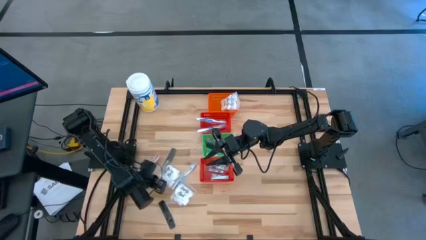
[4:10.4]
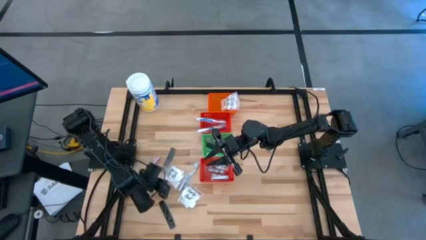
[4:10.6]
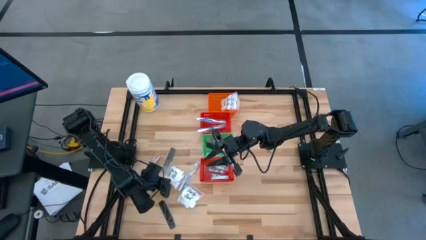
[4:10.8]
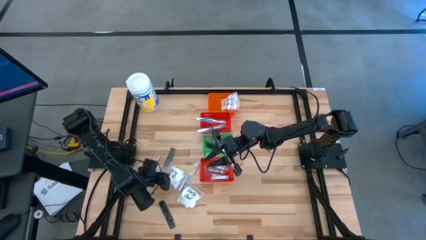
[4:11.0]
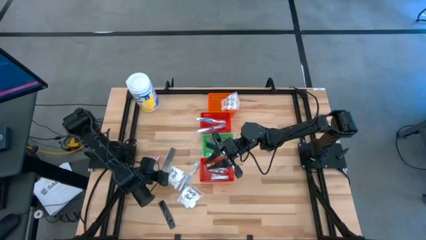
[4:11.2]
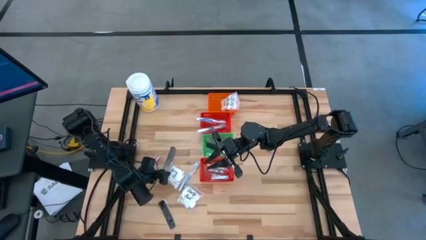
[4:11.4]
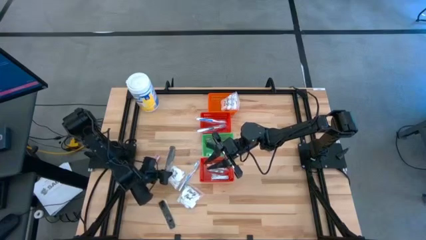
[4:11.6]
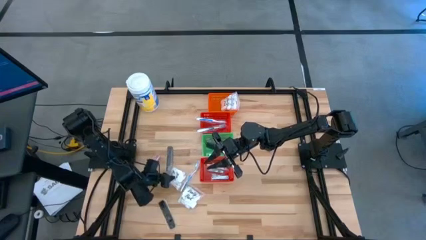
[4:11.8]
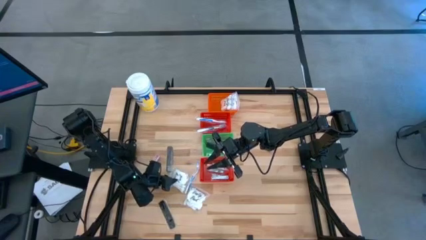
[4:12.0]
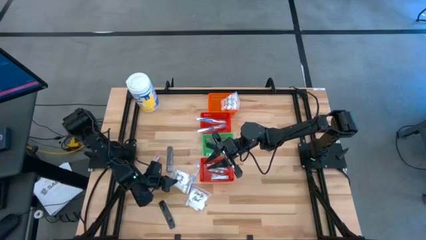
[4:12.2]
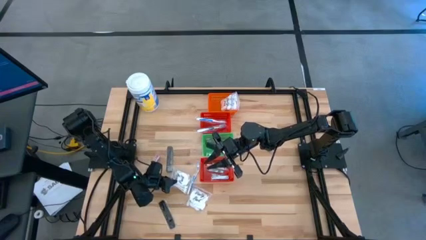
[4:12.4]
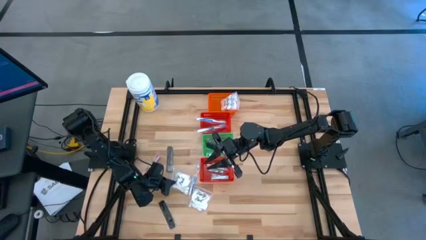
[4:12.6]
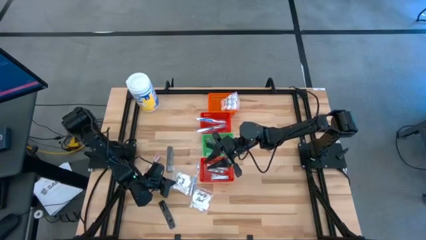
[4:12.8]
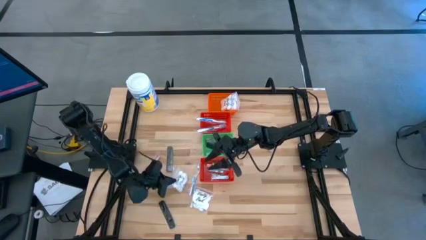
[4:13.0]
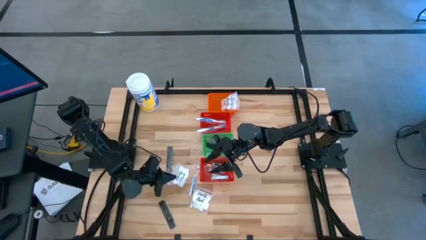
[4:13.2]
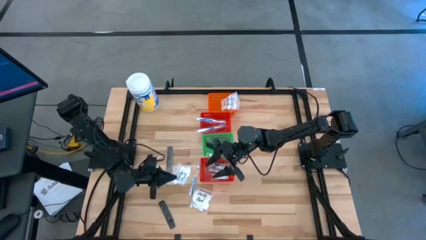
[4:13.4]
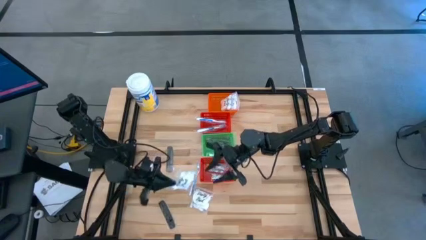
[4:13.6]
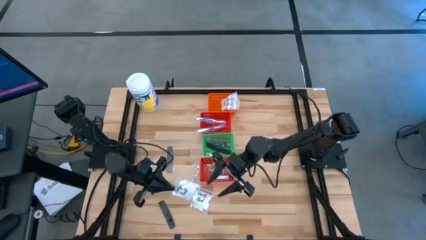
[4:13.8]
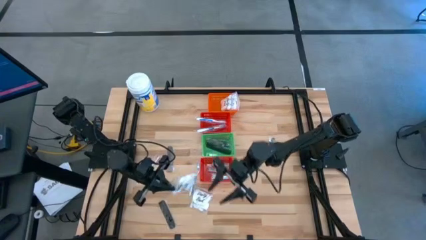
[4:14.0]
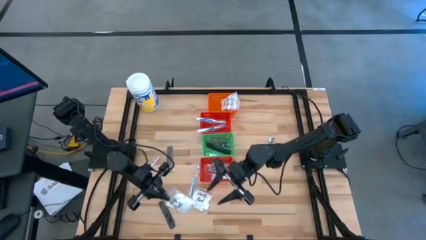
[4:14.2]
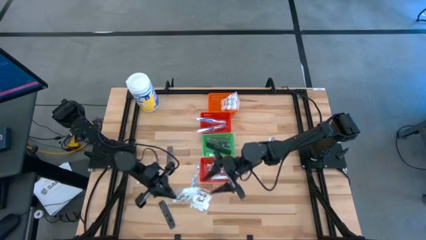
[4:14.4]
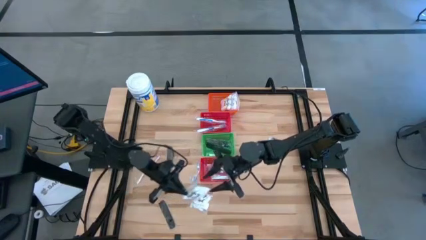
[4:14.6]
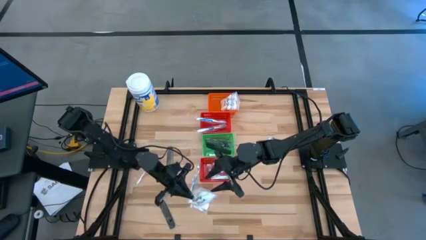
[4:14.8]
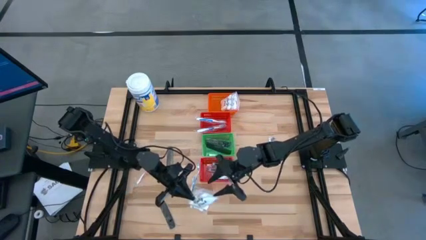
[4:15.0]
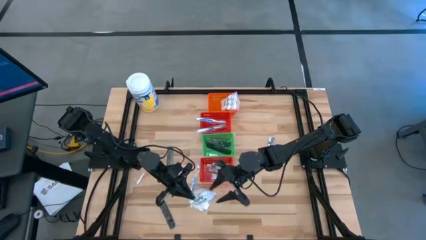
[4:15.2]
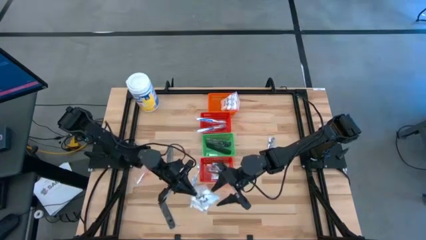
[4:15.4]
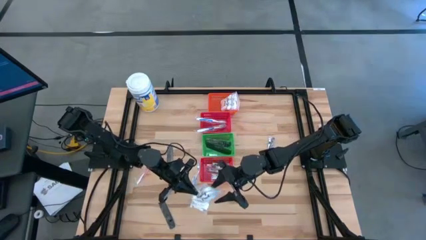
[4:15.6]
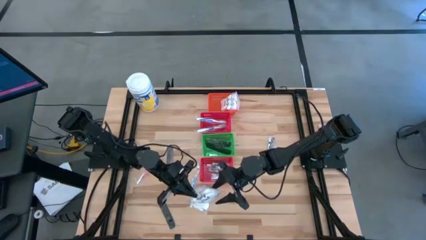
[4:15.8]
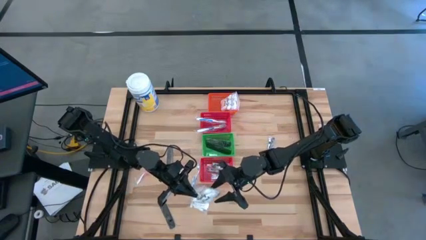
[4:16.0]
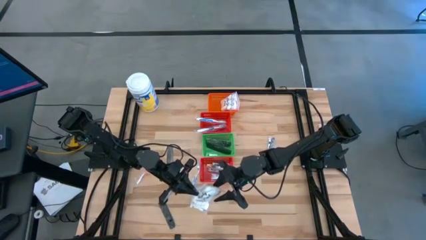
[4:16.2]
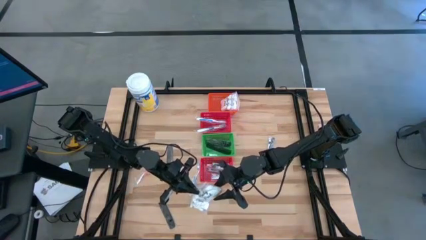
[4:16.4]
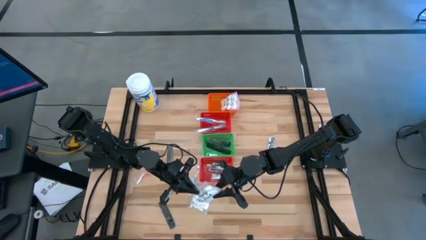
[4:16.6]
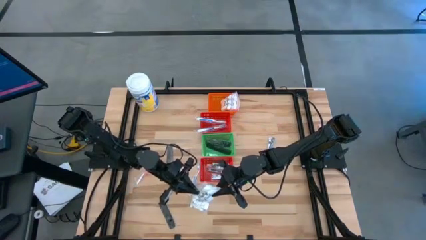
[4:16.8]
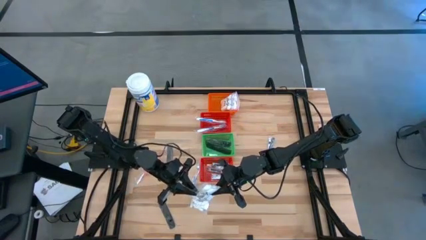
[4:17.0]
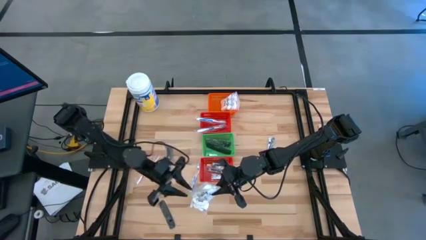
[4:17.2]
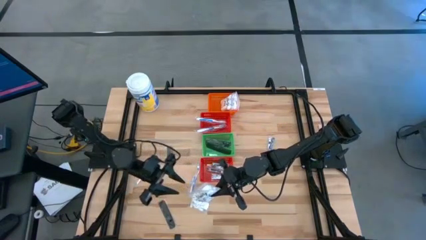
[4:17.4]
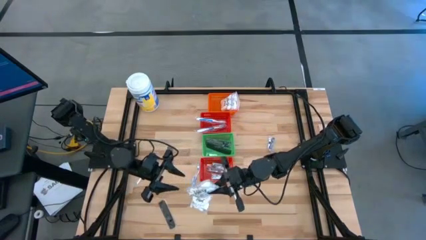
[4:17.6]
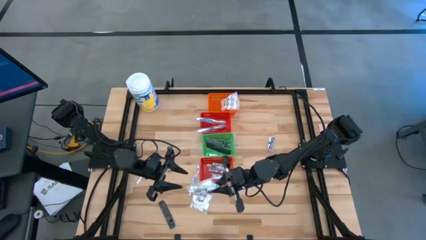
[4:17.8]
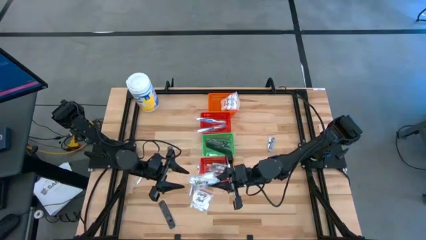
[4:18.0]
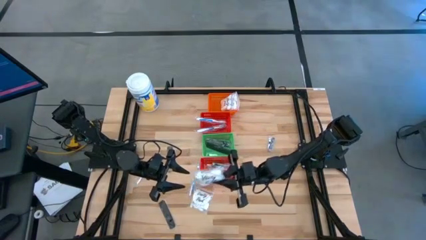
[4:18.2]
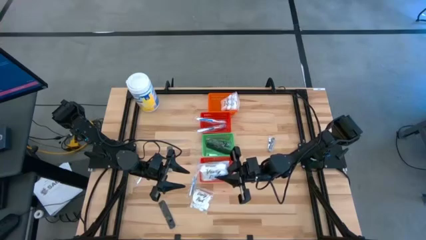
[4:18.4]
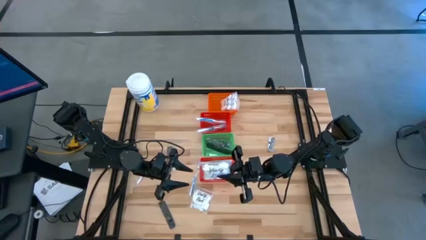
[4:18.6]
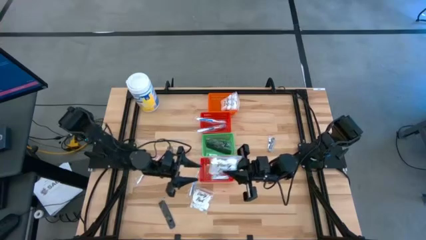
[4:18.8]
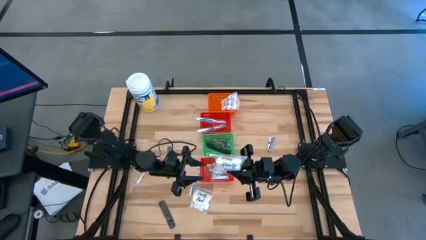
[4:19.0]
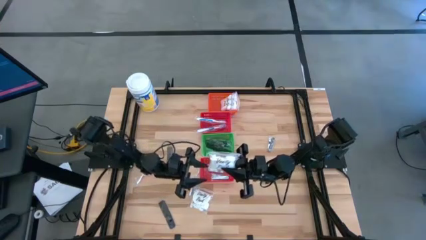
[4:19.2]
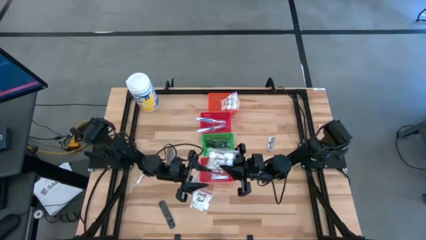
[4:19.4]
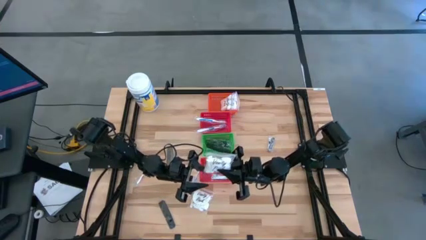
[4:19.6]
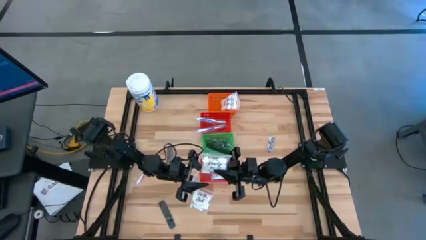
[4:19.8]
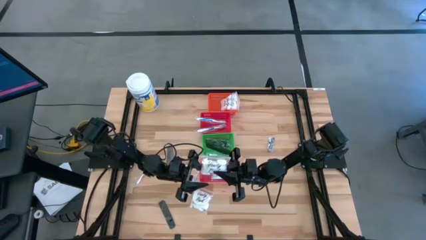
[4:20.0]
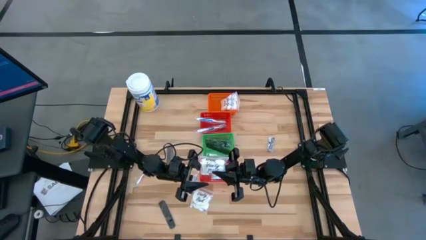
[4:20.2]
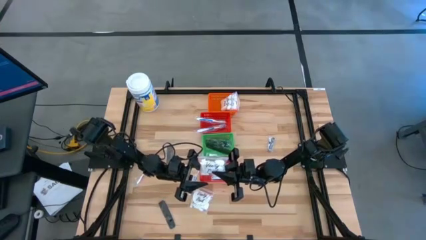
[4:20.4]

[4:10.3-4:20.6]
Task: Pick & Place Travel size toiletries
Put the transparent cotton pack into the orange basket

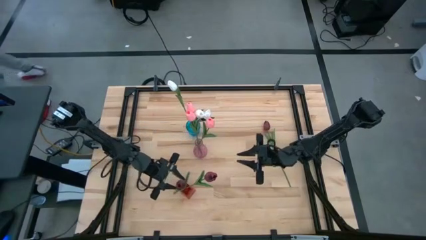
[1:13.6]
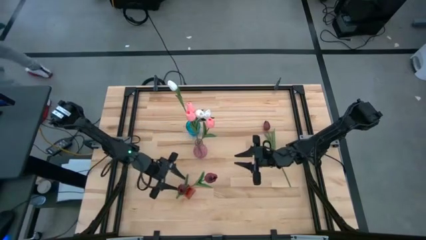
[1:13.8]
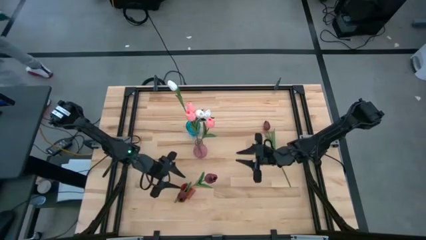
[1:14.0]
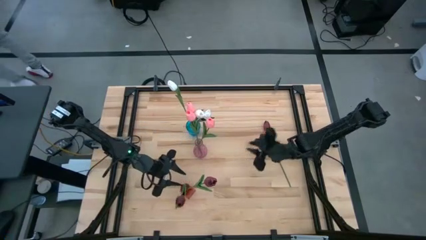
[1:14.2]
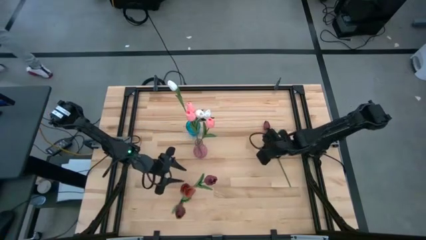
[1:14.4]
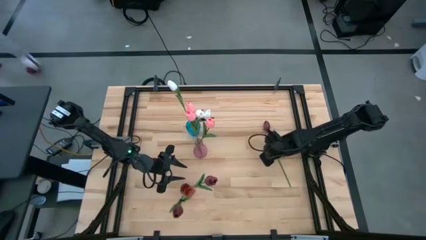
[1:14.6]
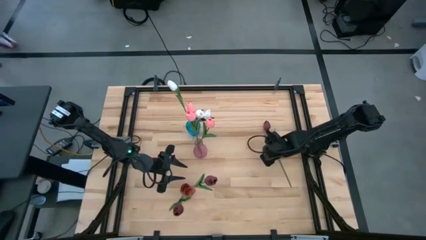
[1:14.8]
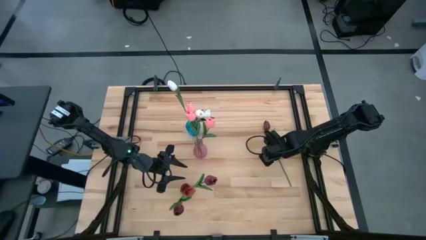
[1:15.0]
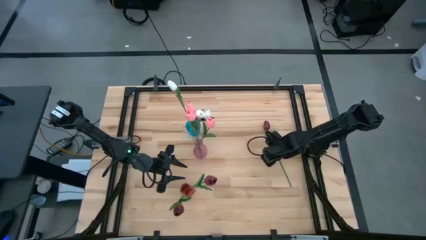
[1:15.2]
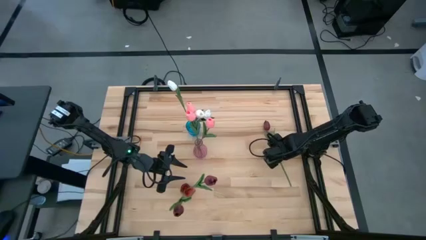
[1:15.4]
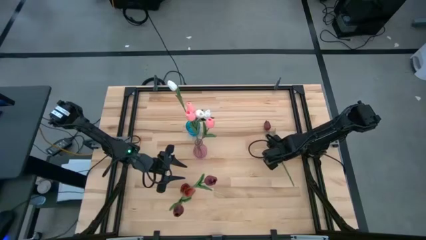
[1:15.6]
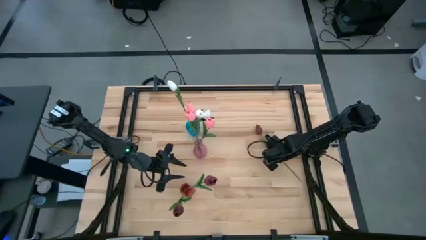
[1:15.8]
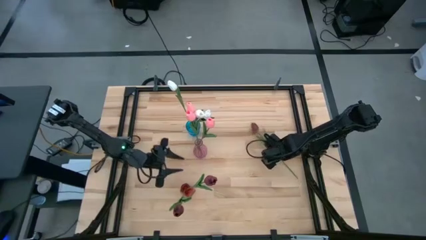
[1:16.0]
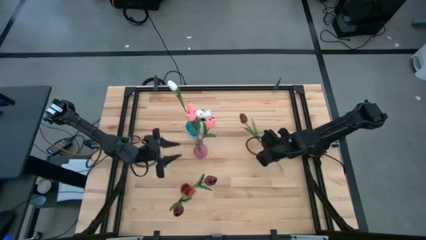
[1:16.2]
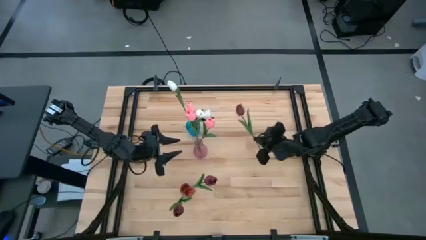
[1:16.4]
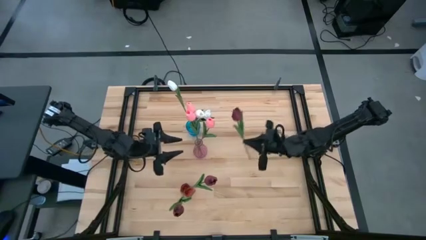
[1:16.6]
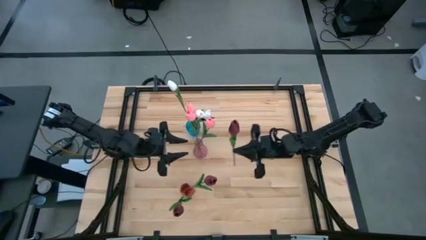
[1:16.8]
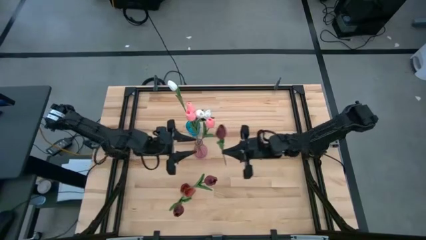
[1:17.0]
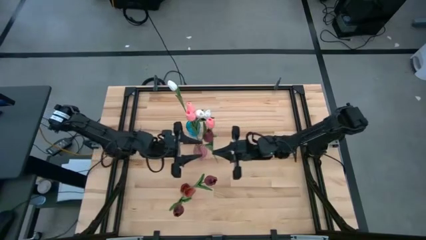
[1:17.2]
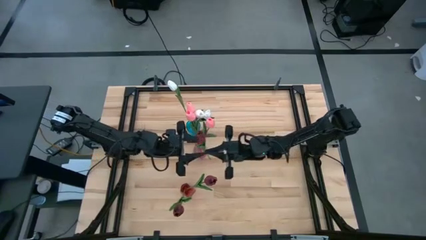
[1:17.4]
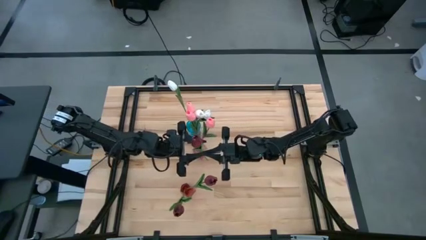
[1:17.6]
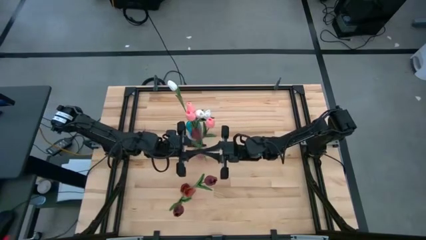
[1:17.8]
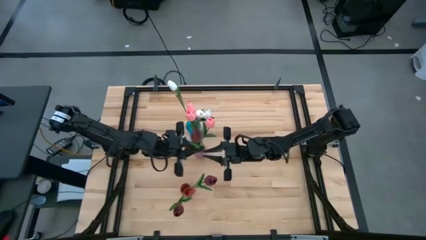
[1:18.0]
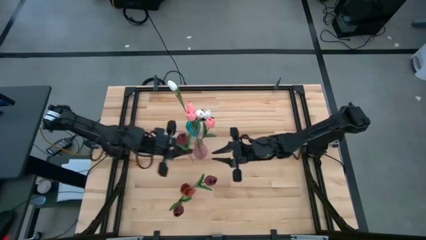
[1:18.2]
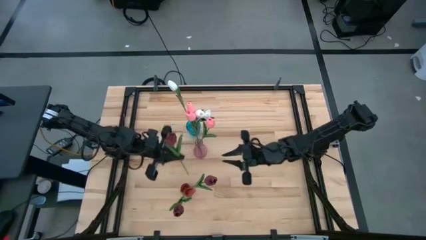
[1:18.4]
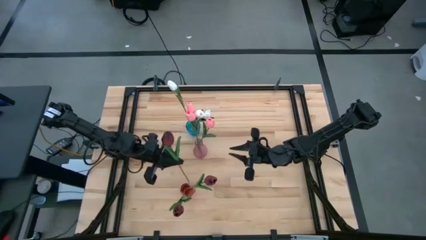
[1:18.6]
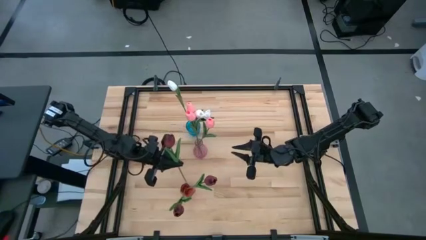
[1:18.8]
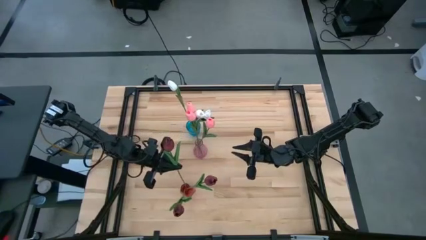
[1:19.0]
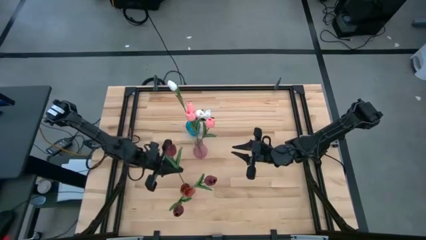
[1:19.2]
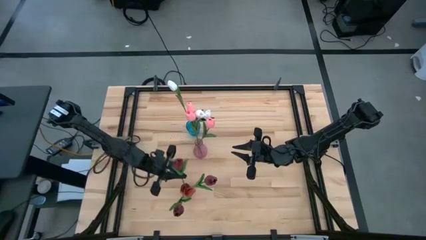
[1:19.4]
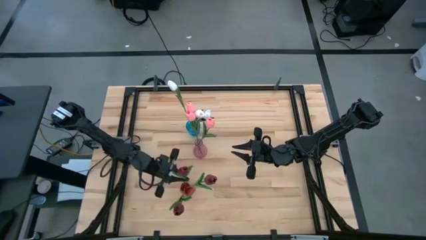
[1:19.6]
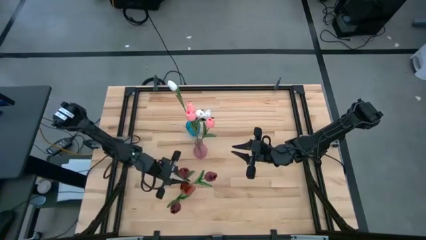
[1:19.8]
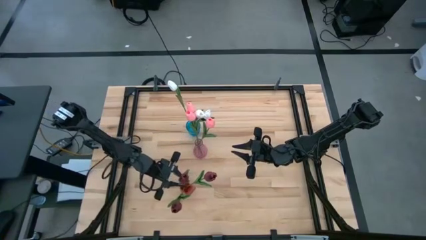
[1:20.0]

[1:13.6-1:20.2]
Task: Sort flowers into vase by color
Put the red tulip into the red vase
